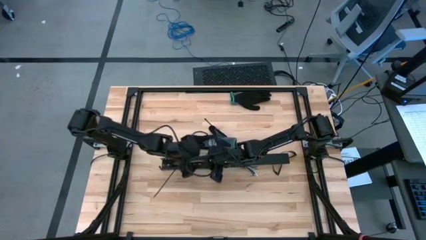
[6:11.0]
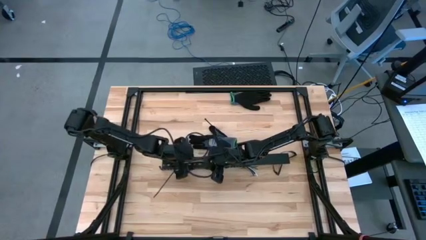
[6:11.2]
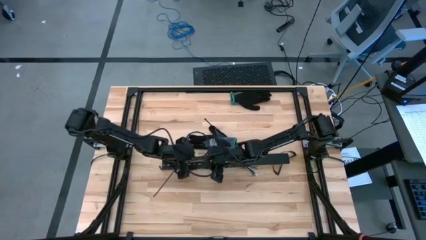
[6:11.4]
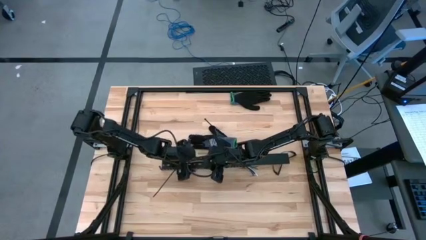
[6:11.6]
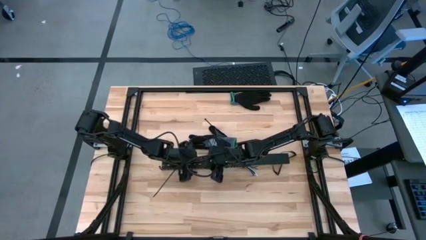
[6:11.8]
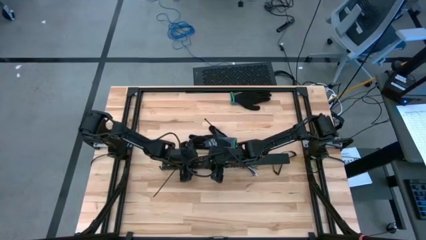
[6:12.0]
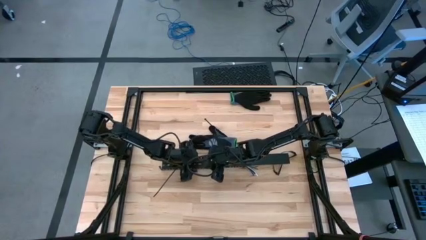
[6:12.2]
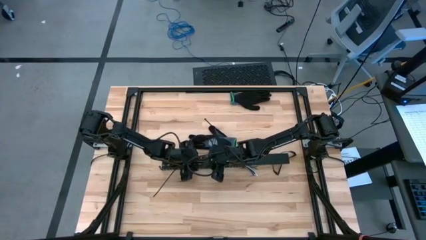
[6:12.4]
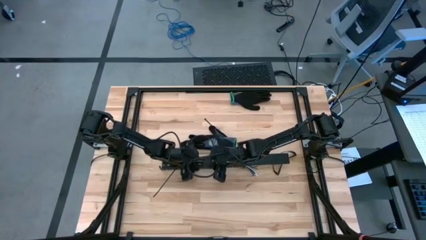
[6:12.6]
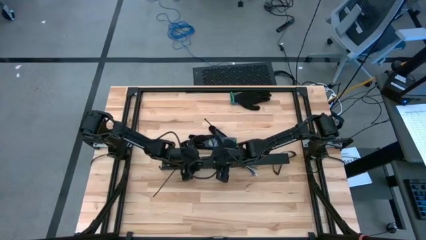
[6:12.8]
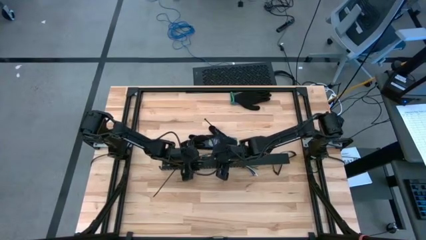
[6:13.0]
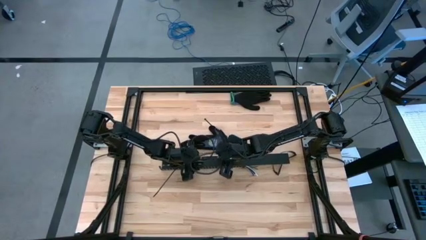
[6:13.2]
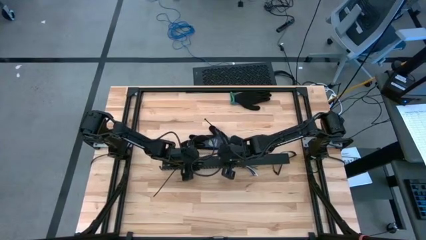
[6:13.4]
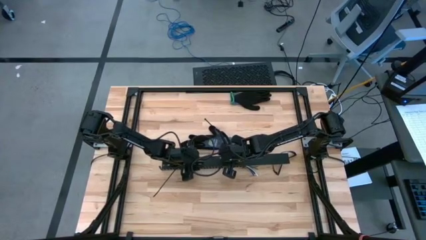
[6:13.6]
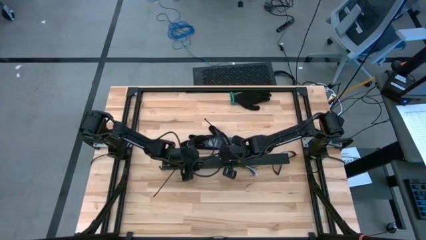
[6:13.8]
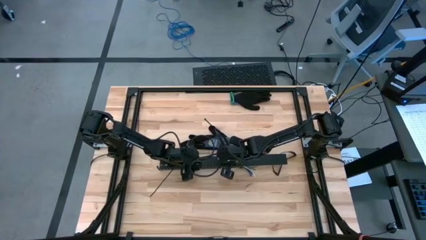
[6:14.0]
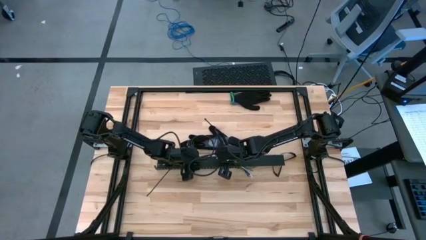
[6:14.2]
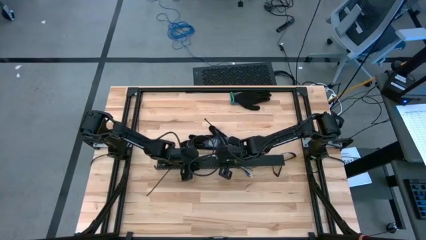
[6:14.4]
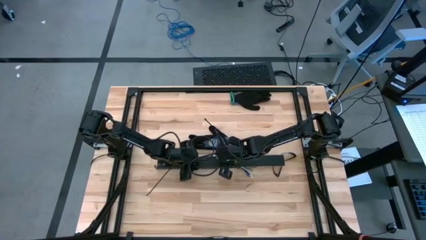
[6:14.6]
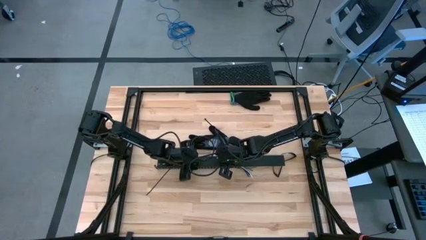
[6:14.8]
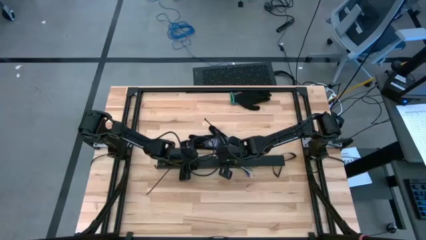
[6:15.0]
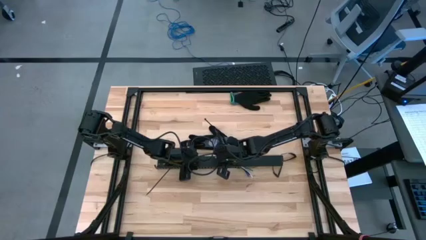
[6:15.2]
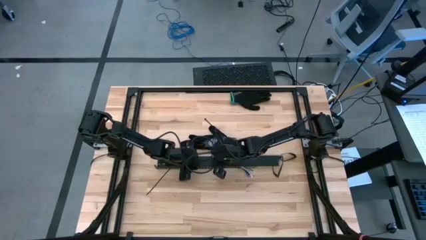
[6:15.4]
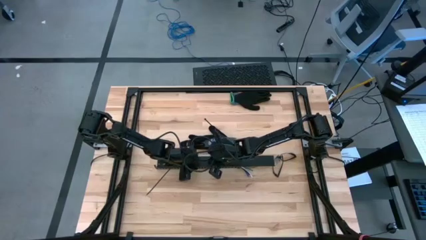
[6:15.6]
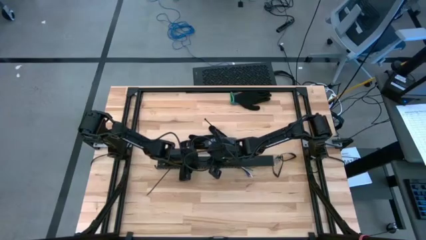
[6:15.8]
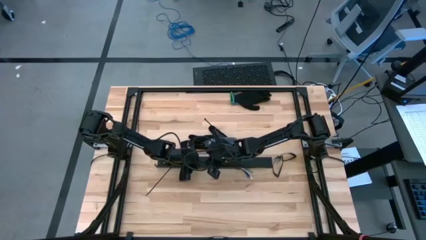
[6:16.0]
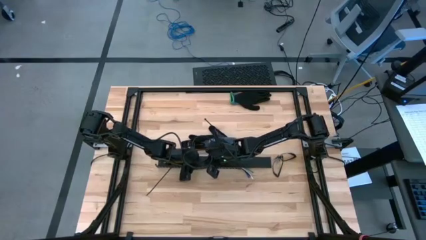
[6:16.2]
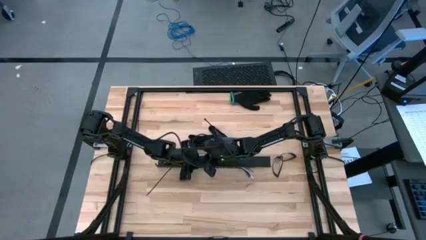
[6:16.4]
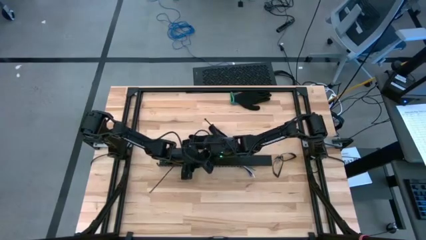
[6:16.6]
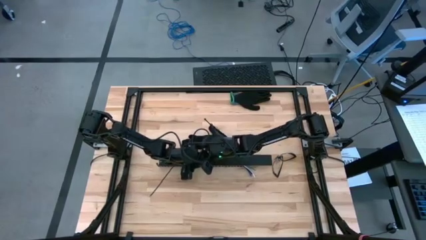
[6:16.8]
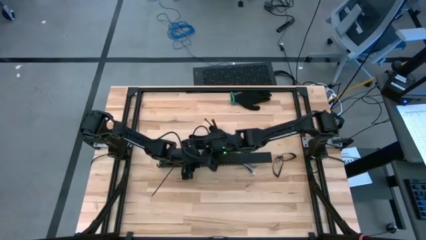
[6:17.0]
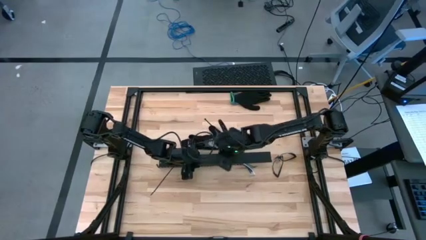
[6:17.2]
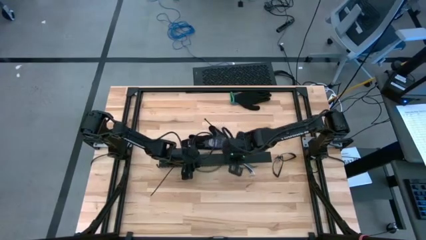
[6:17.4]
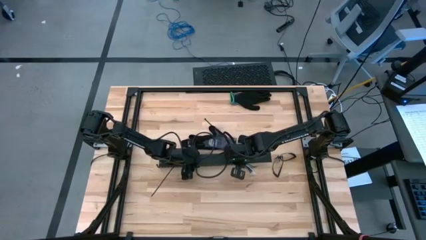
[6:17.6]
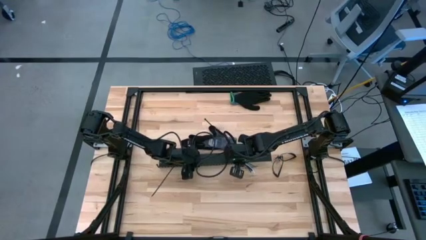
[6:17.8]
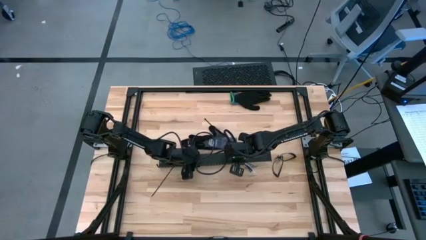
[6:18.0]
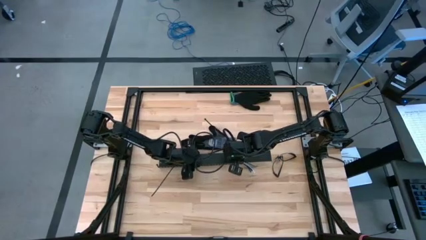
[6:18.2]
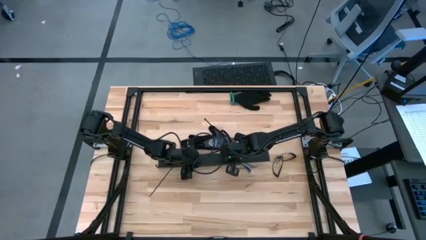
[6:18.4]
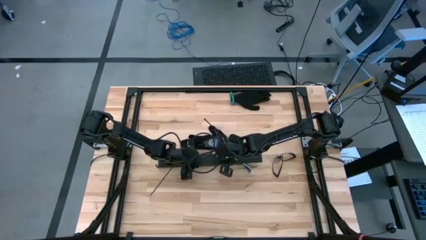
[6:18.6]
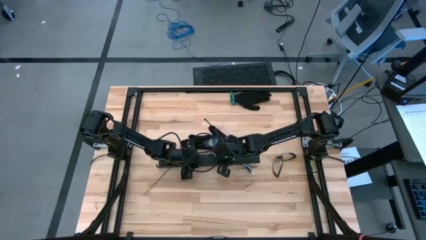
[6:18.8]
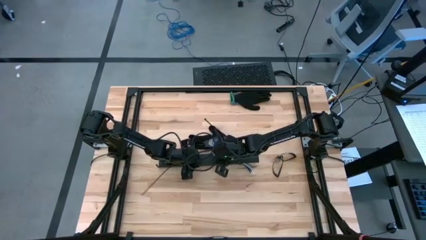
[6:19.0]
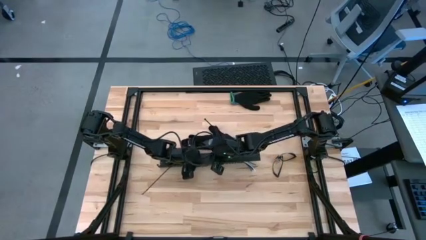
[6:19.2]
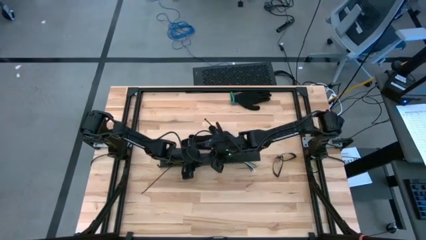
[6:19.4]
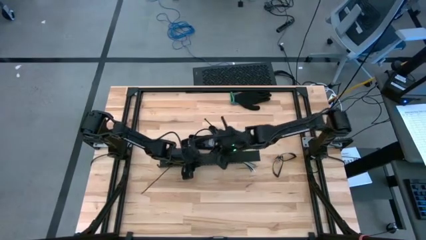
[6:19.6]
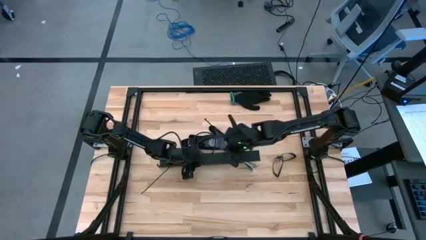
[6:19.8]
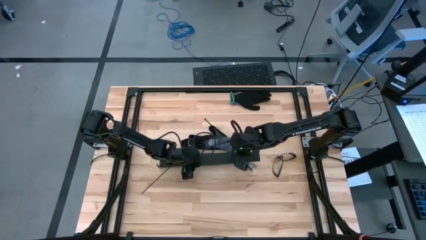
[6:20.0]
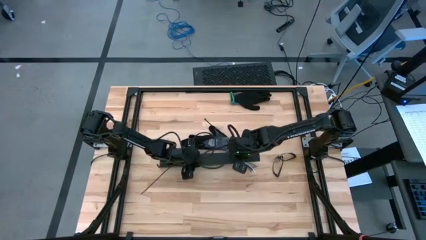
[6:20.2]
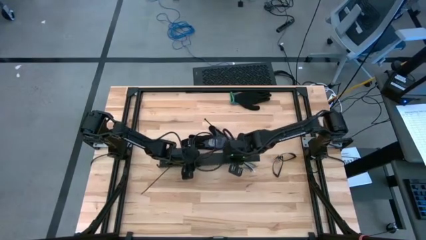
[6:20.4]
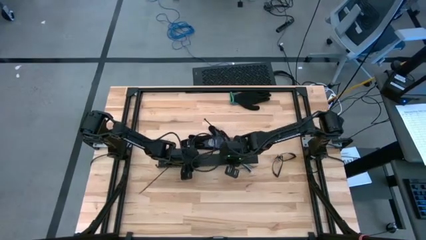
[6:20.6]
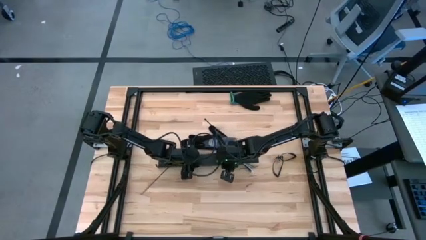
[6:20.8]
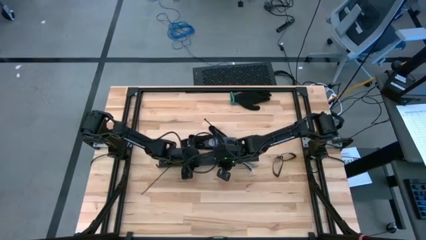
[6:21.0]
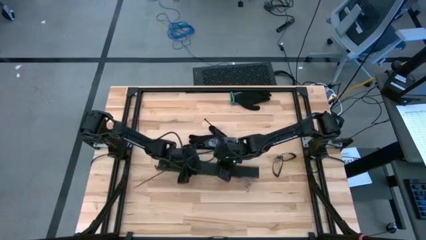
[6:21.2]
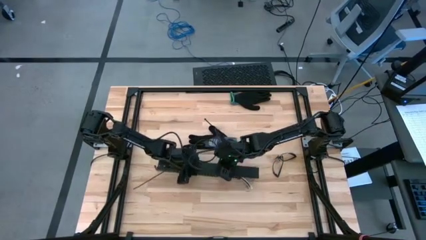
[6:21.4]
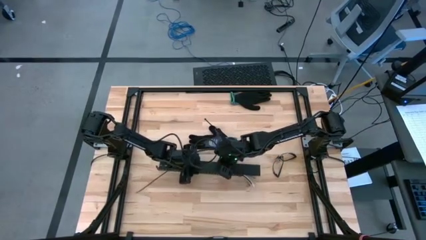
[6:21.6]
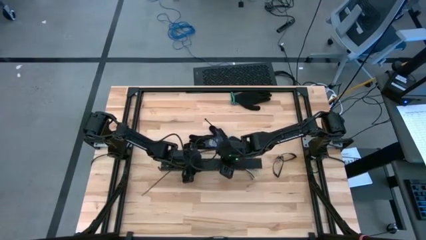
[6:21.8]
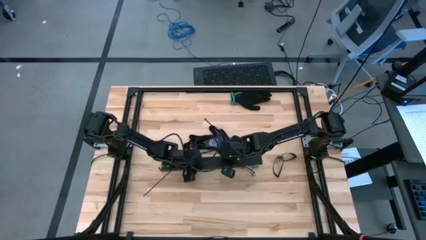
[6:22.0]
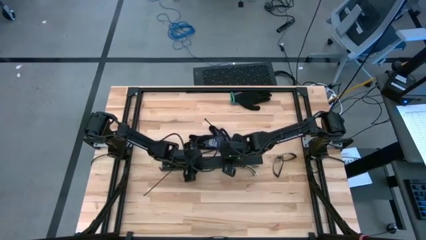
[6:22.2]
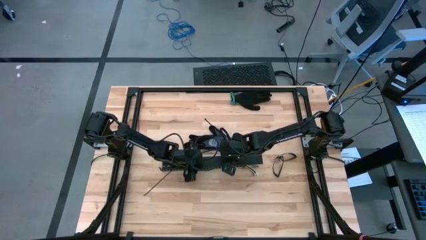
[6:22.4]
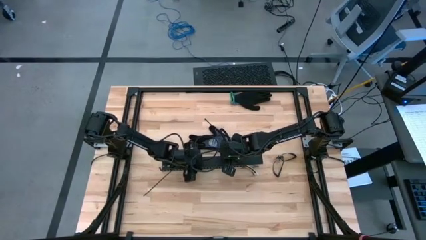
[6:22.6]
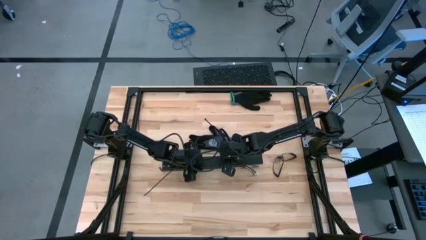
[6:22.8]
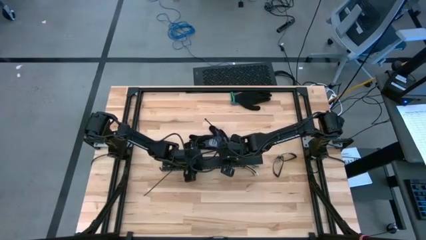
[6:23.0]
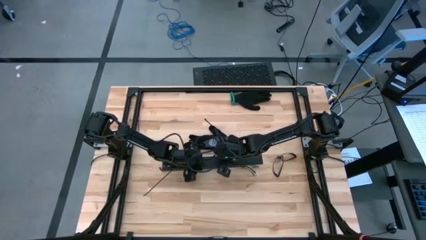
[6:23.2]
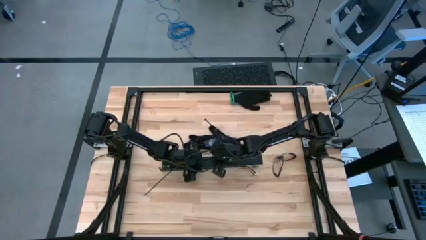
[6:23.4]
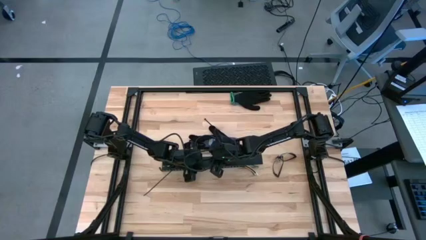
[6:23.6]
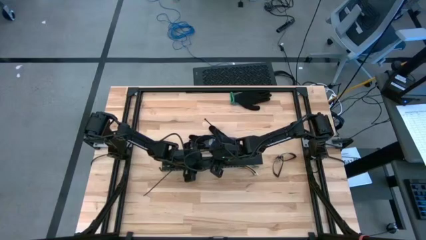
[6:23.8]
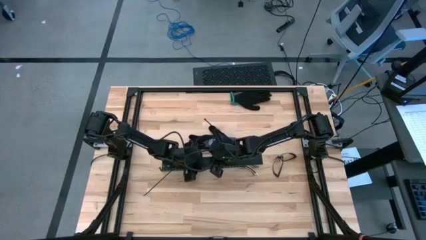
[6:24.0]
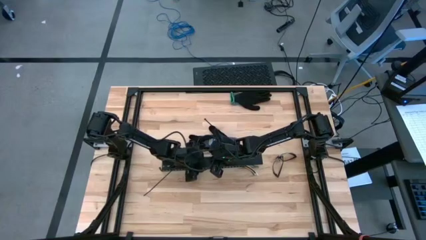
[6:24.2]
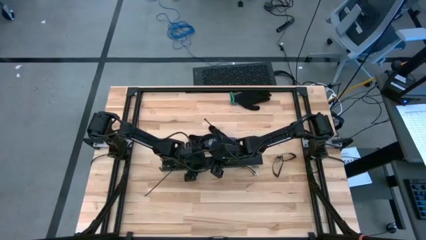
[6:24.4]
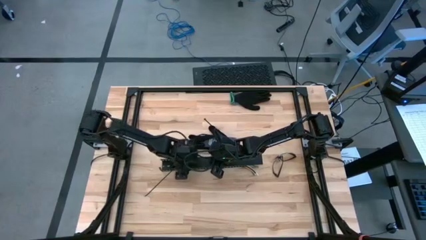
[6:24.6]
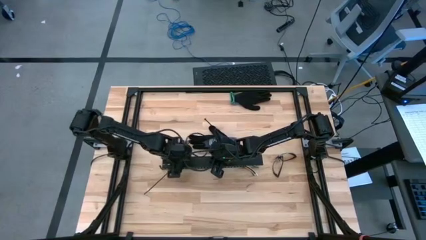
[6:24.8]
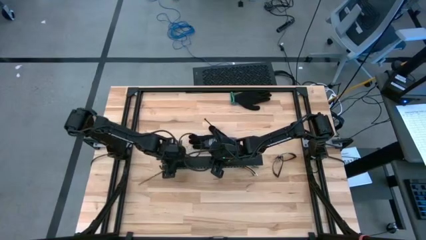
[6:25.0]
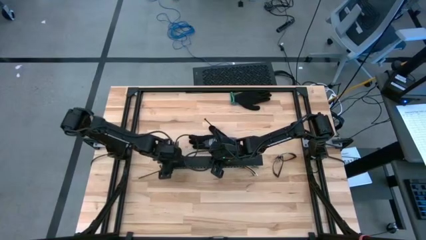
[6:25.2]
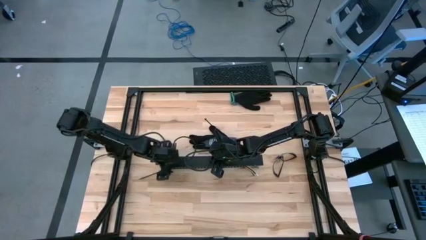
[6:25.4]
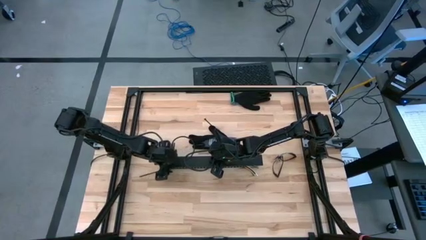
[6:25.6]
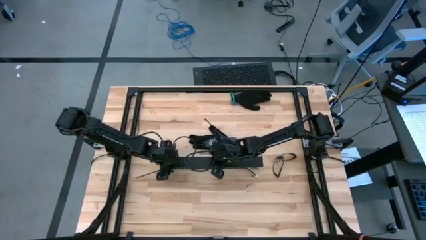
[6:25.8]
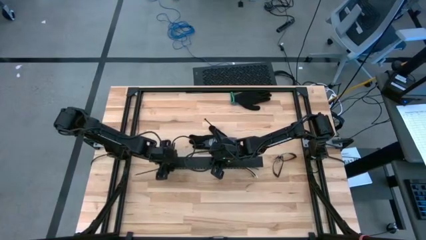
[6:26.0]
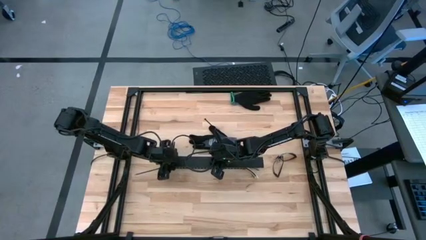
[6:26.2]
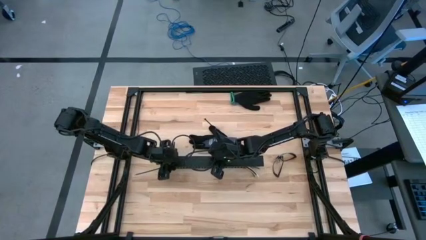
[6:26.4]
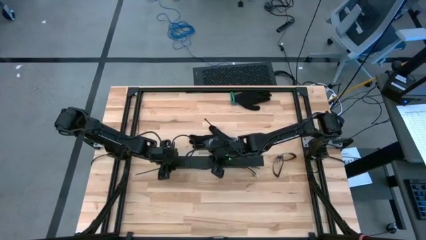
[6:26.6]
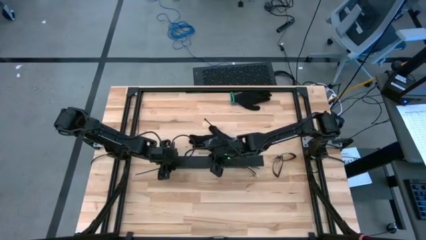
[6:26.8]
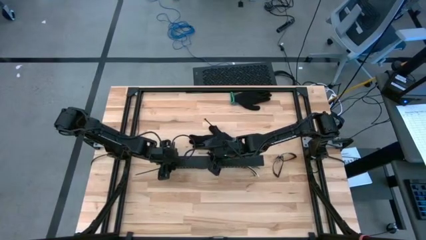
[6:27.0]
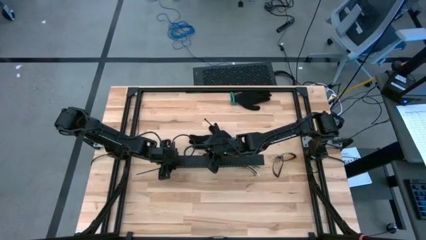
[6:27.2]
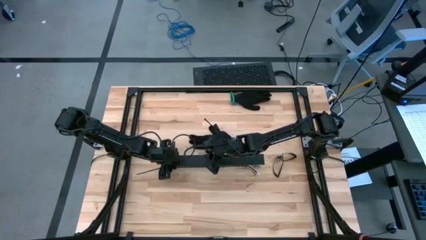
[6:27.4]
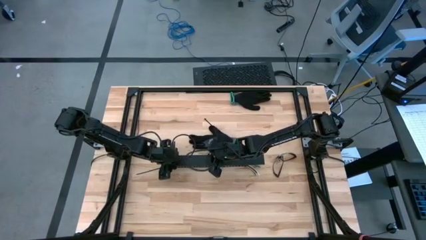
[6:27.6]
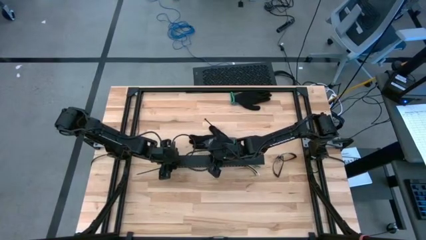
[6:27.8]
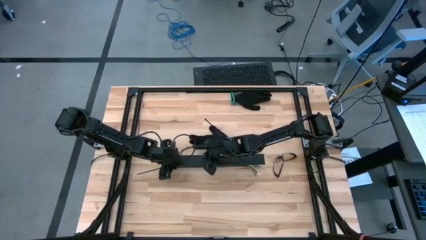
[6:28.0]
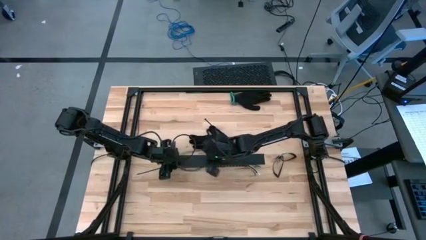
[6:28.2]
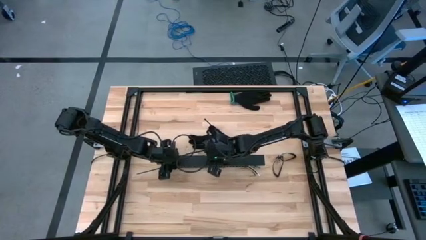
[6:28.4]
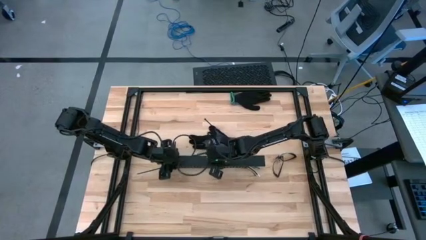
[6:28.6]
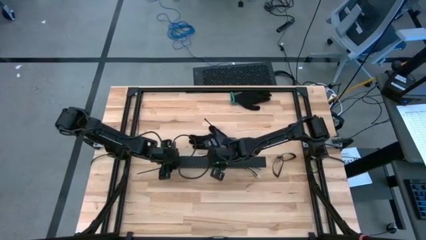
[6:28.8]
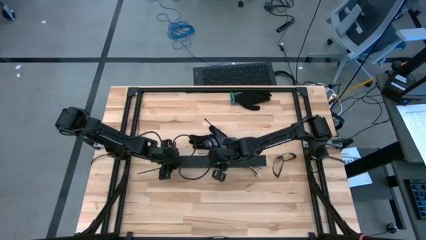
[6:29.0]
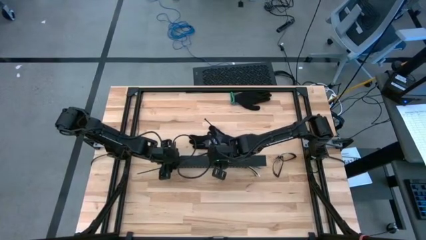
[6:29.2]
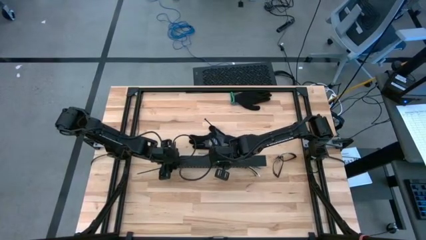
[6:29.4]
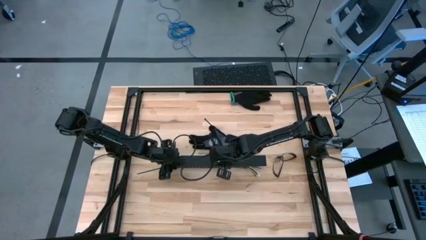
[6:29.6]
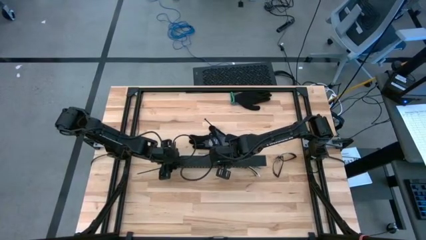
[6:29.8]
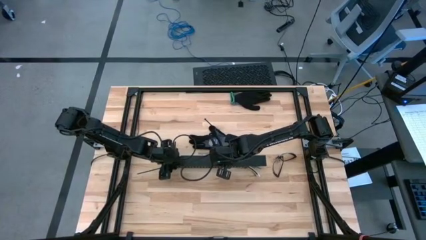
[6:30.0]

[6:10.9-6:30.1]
Task: Ziptie cables
Close the black cable duct
